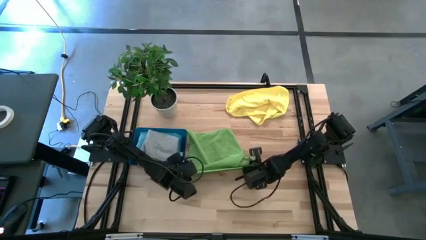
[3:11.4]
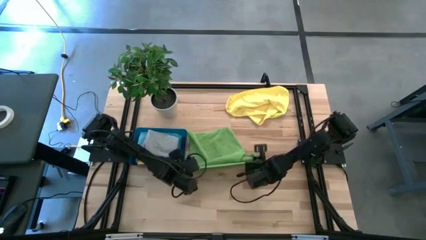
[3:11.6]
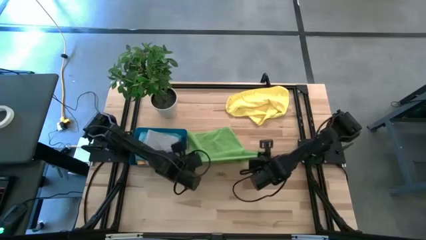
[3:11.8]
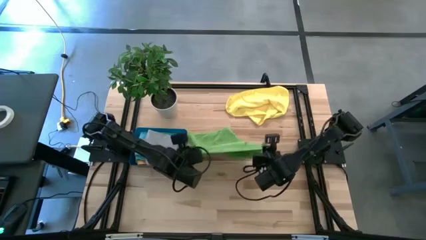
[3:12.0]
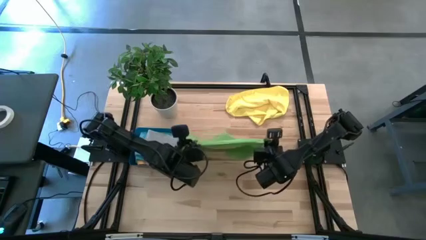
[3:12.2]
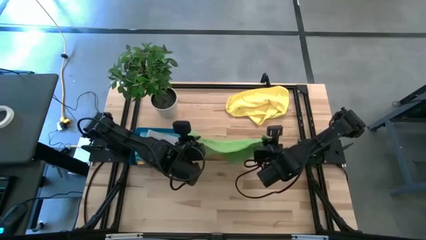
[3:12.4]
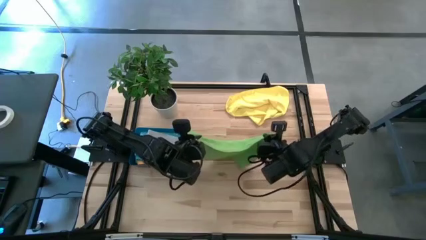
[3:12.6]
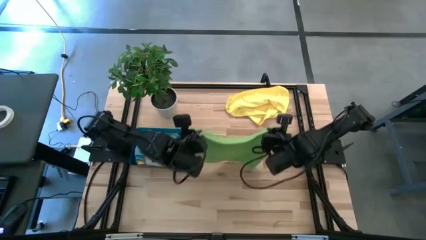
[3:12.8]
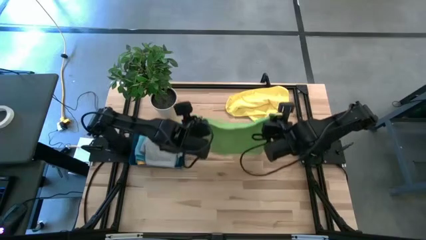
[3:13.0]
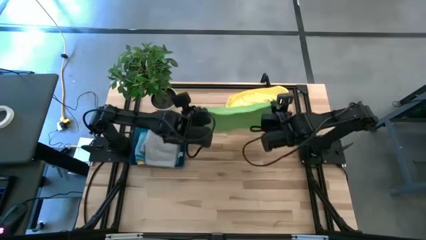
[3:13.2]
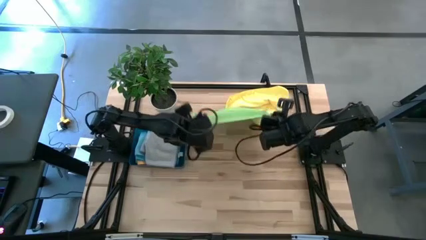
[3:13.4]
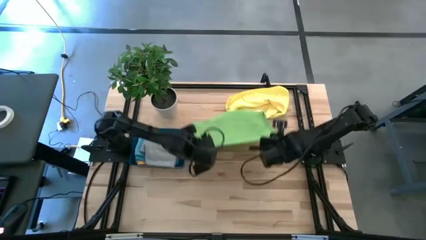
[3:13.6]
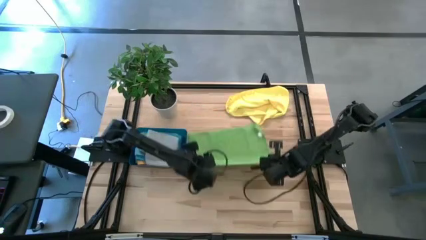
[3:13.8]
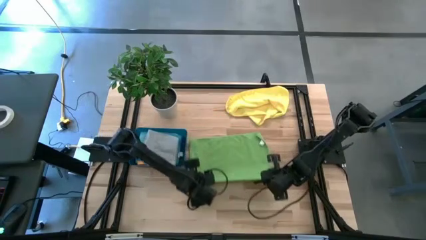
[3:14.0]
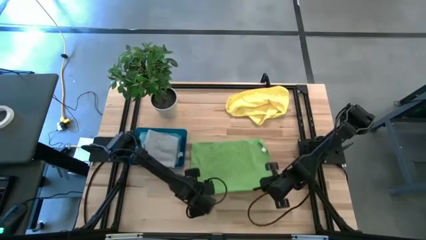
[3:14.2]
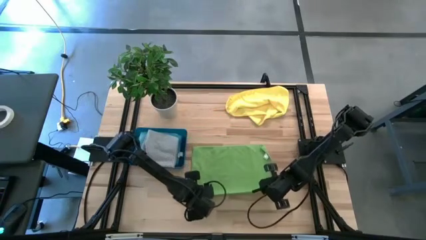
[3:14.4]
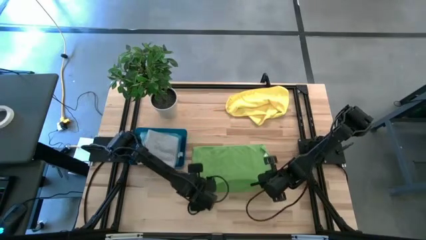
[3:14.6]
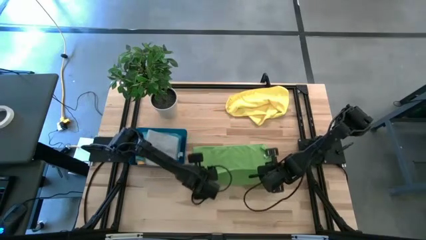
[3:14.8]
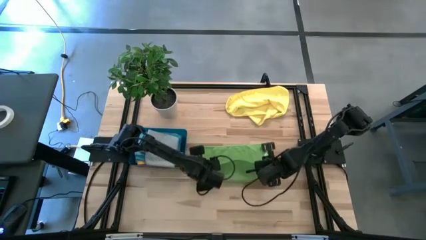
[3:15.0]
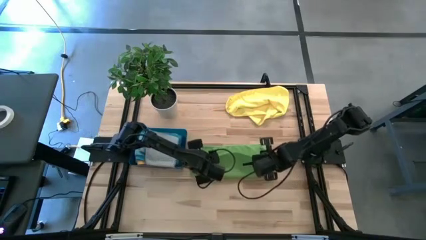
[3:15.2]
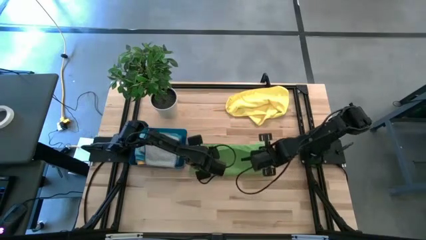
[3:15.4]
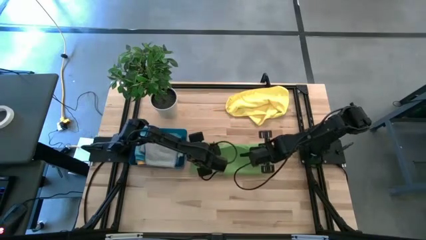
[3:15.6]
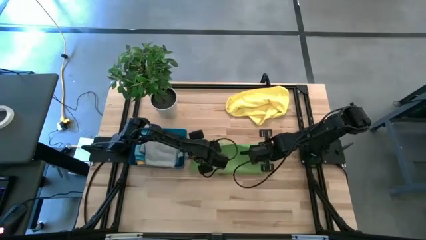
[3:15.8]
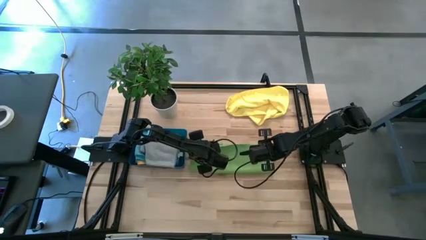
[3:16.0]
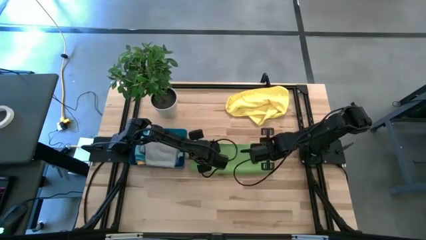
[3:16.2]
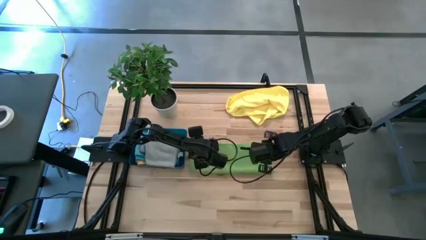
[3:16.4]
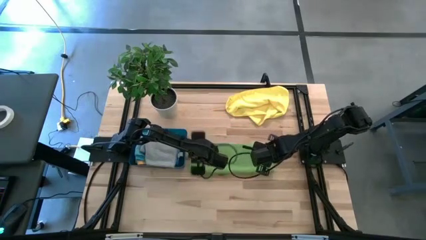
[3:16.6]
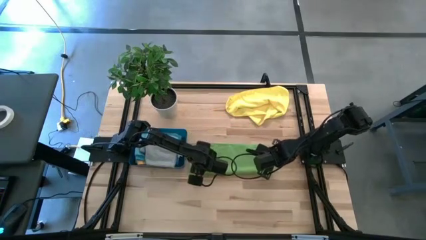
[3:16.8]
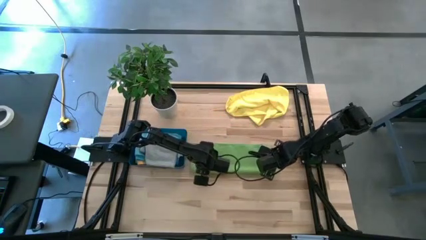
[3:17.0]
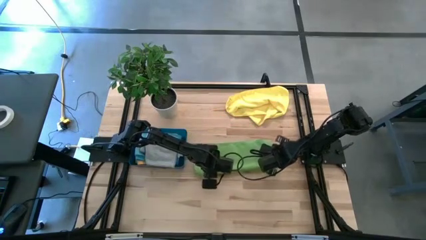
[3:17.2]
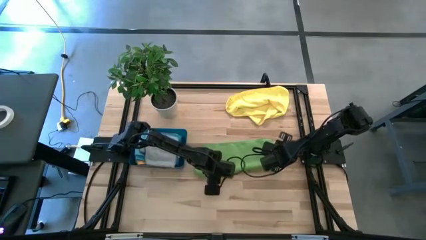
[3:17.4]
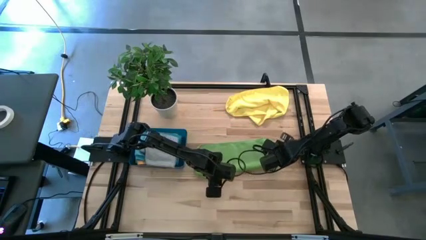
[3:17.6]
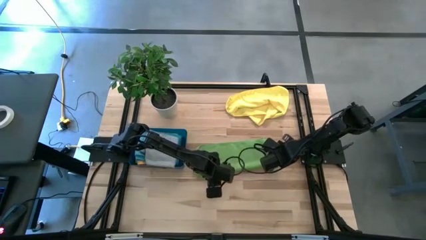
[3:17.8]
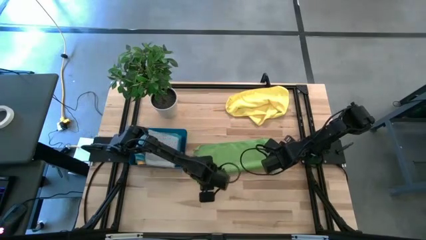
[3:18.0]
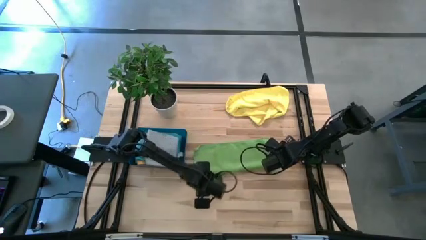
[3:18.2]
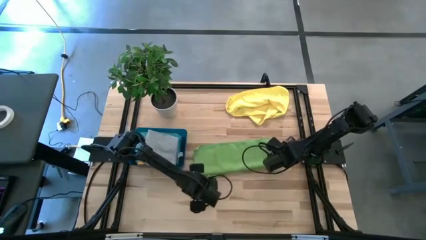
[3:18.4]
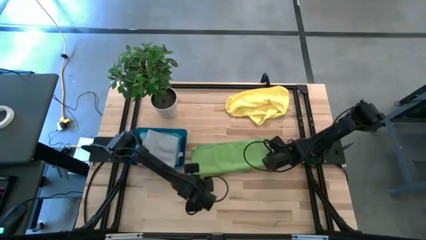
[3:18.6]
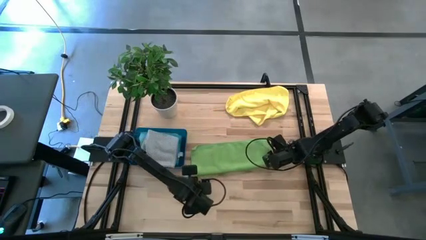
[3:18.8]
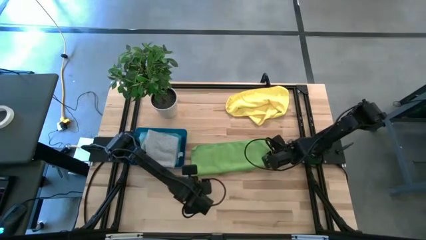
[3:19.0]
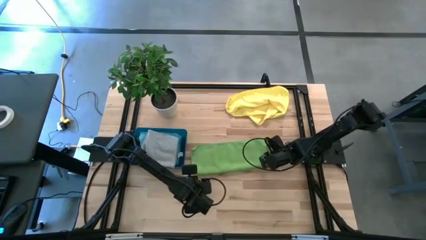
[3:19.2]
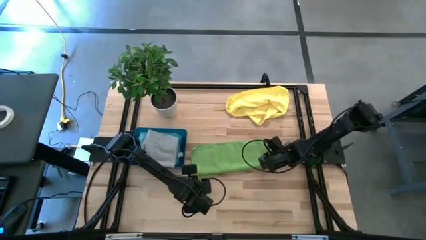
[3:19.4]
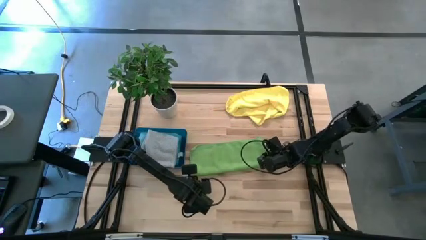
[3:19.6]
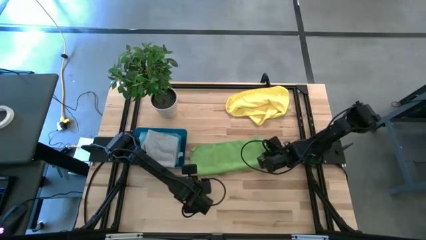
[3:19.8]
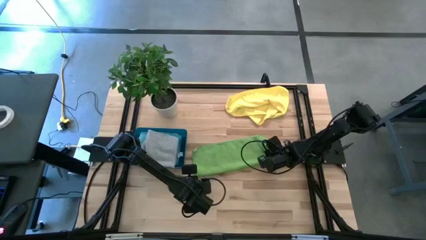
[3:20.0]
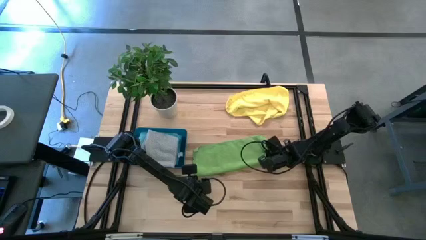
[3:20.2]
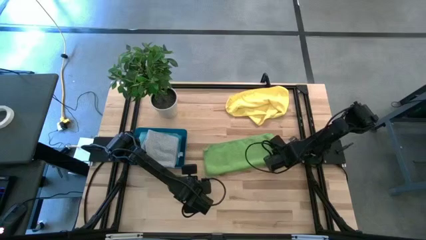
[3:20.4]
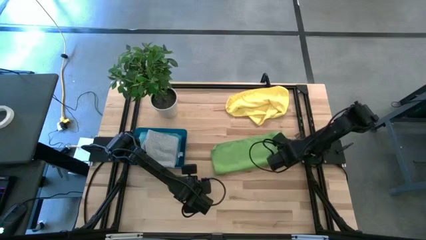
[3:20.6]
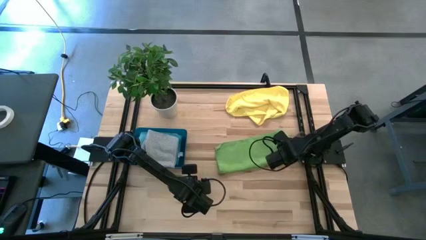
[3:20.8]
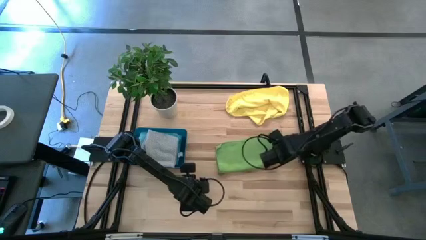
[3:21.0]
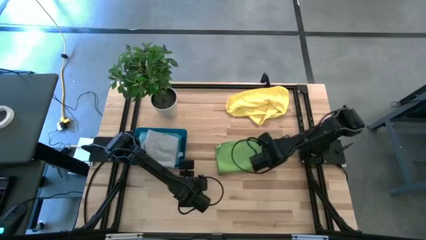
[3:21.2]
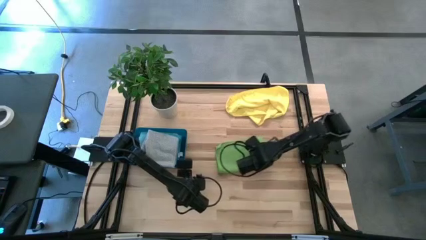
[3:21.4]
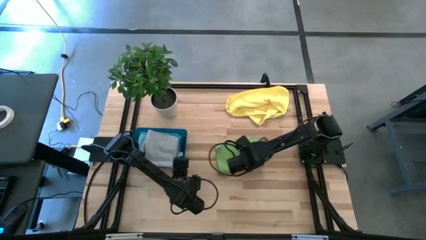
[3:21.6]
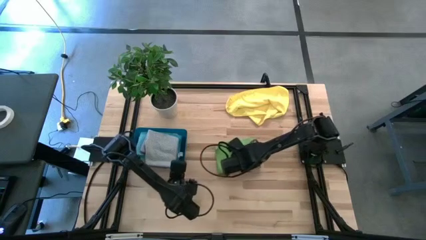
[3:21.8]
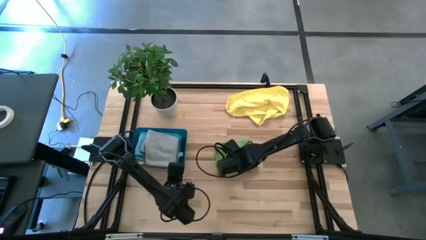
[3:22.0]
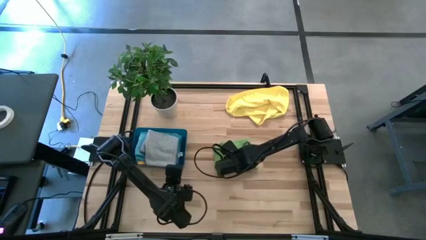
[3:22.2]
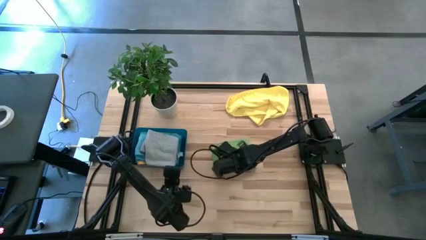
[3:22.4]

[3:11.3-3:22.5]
Task: Fold microfiber towels
Fold the green towel on the table

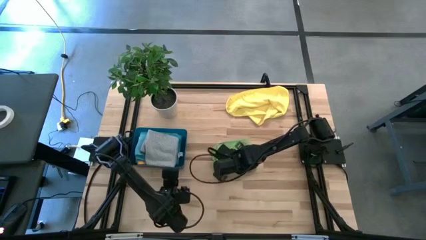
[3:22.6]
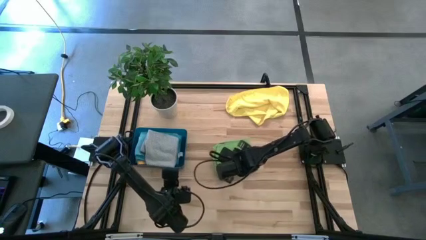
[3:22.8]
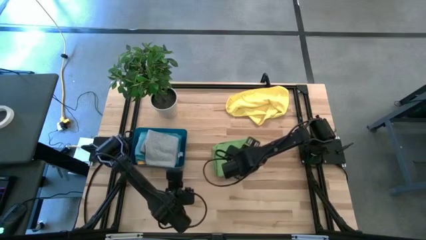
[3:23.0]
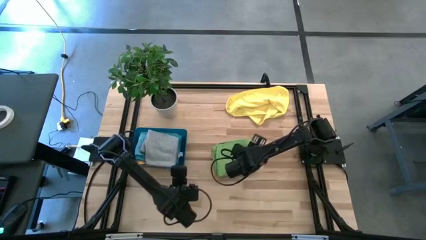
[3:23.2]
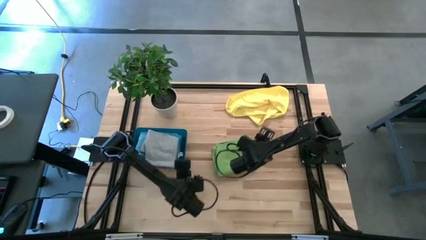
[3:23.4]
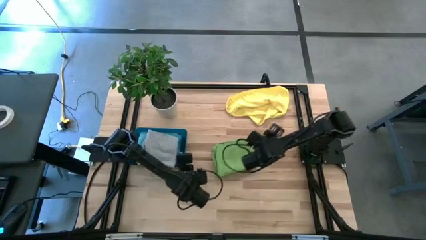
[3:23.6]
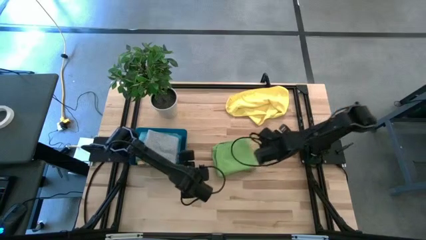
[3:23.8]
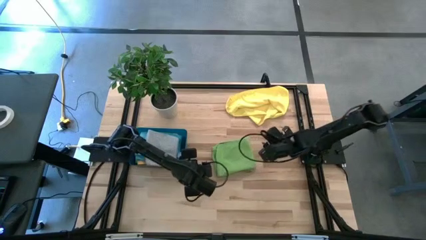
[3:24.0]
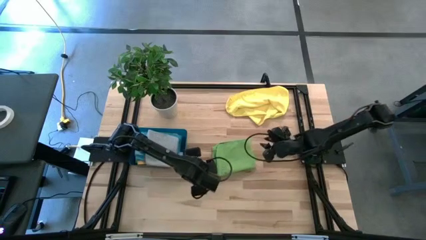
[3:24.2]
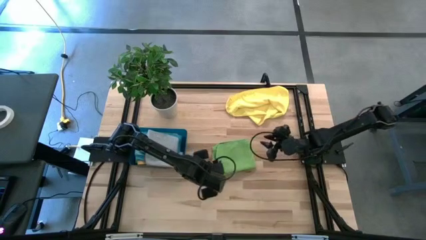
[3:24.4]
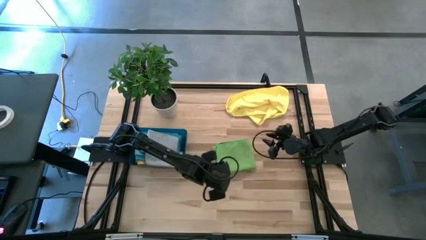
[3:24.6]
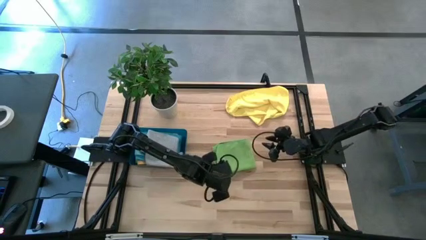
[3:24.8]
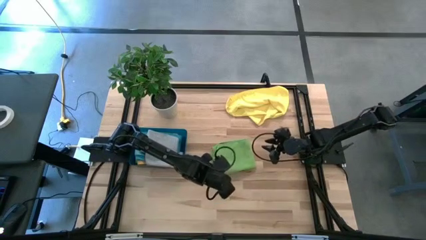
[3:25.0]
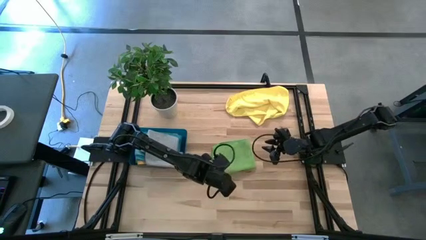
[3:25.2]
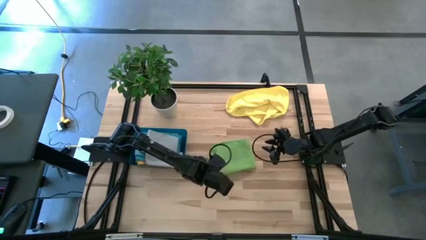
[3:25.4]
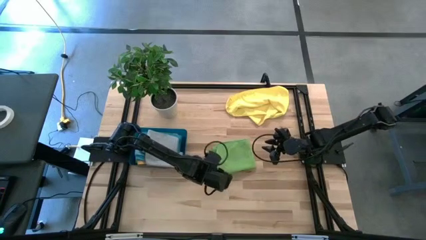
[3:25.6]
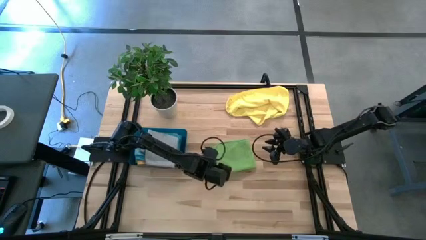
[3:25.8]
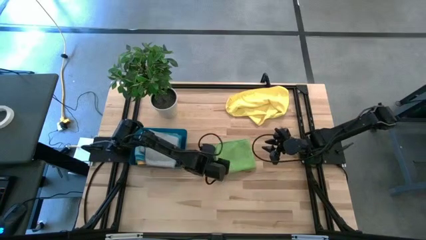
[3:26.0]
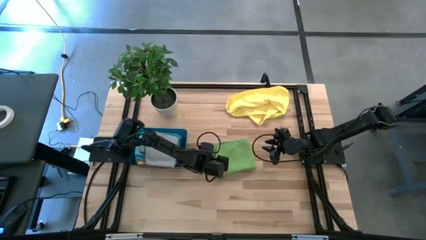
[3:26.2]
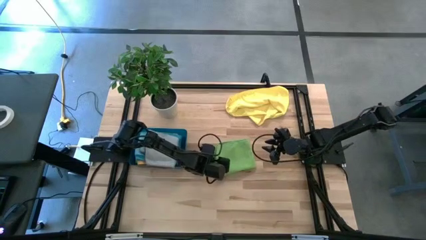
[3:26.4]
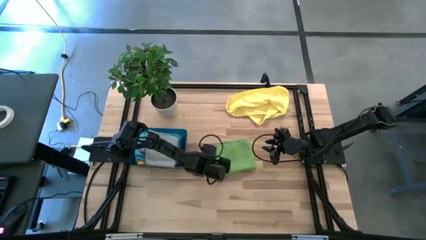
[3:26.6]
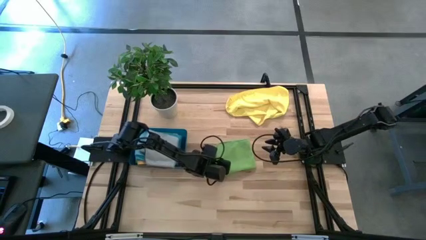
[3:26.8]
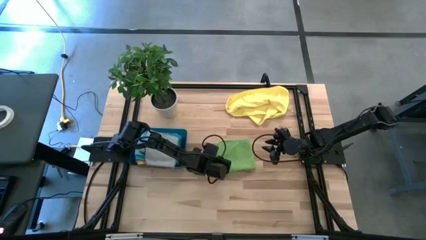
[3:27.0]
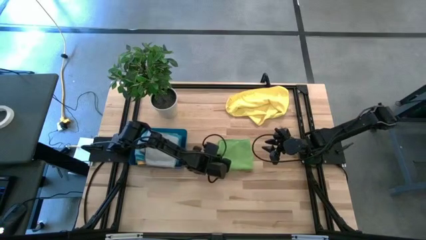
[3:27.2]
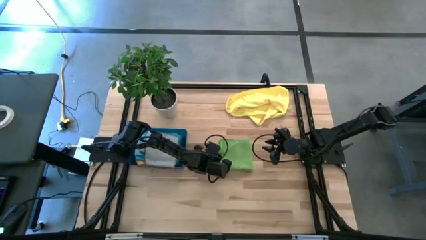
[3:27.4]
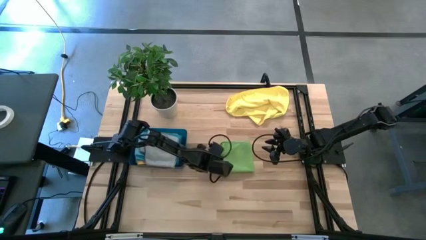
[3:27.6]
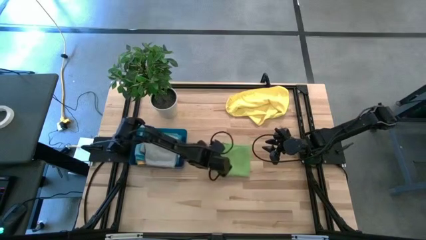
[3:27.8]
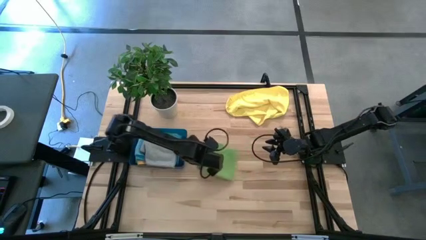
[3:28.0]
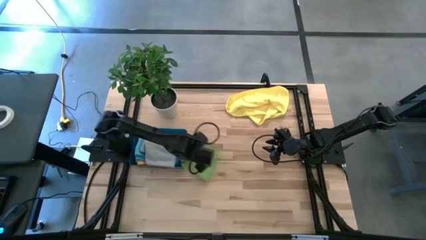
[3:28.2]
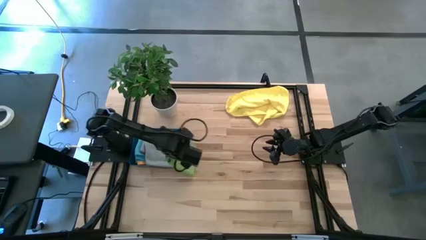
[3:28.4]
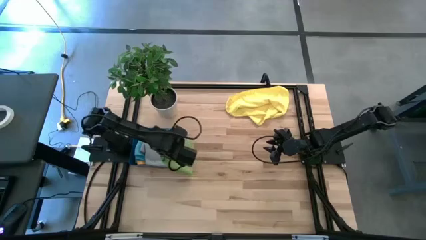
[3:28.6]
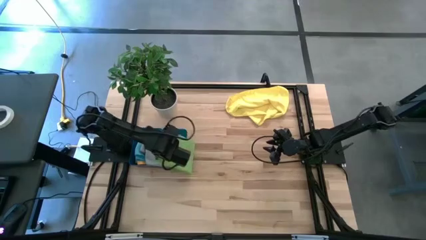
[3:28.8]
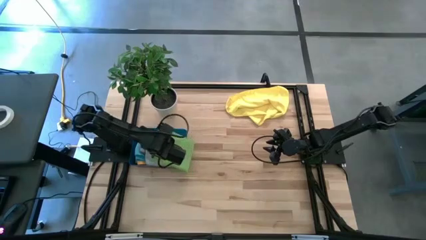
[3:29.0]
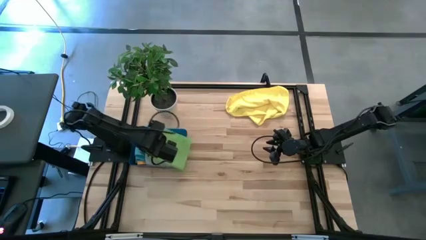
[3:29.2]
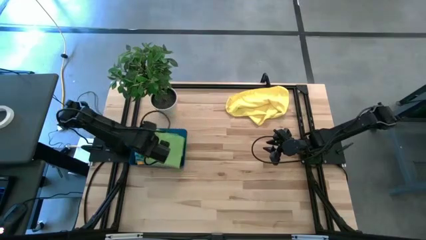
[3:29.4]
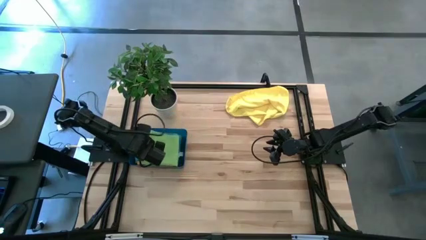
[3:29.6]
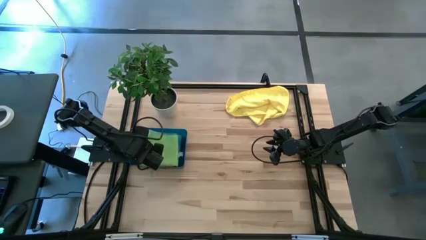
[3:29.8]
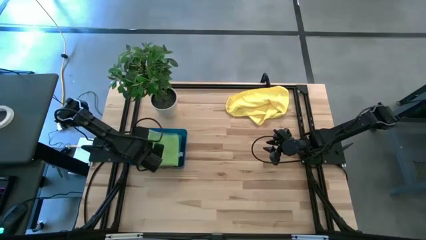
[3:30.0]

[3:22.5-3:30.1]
Stack the green microfiber towel on top of the gray microfiber towel in the blue bin
